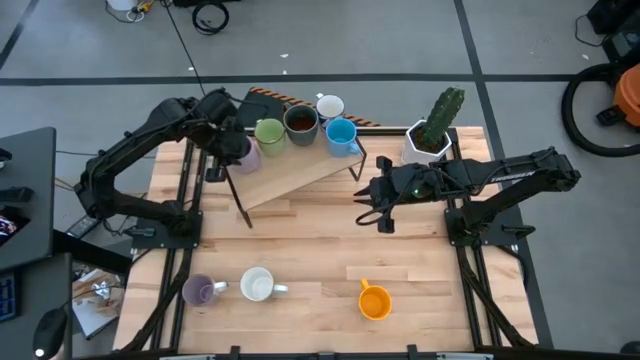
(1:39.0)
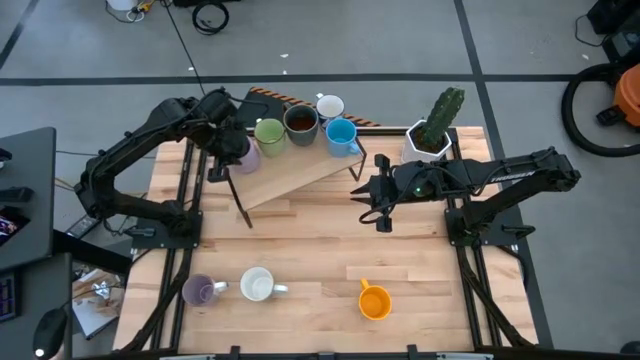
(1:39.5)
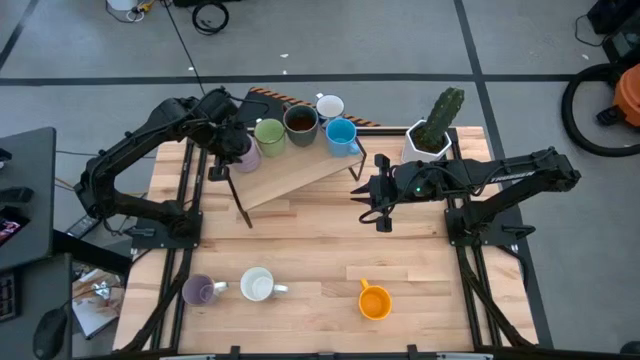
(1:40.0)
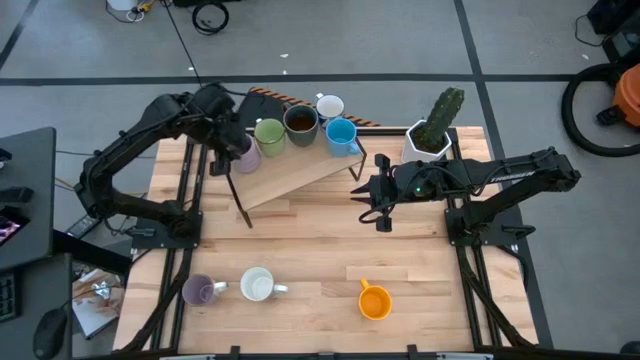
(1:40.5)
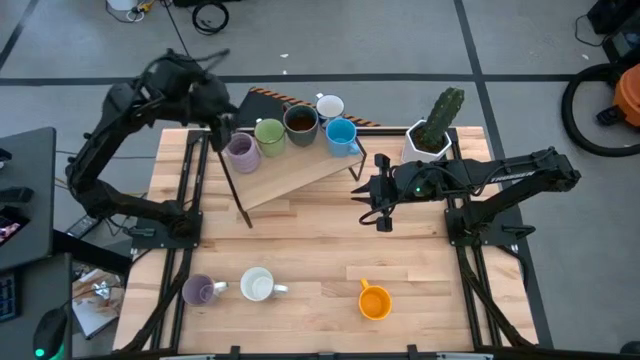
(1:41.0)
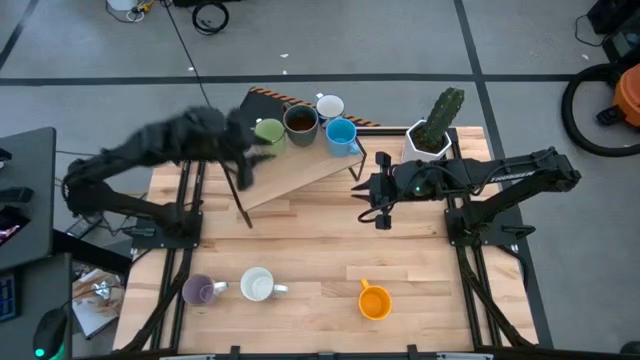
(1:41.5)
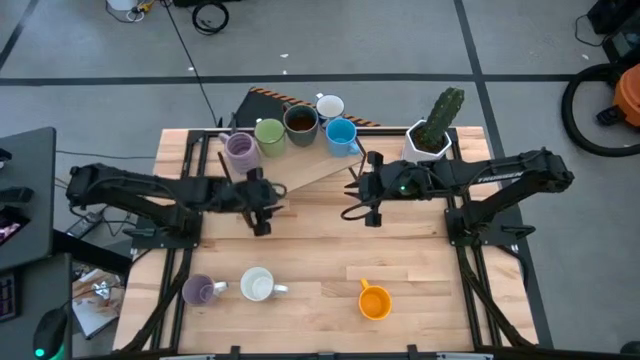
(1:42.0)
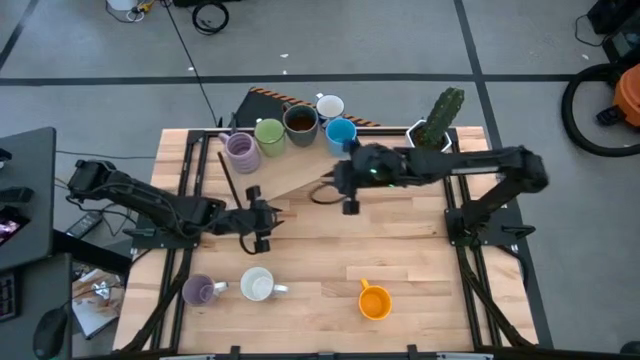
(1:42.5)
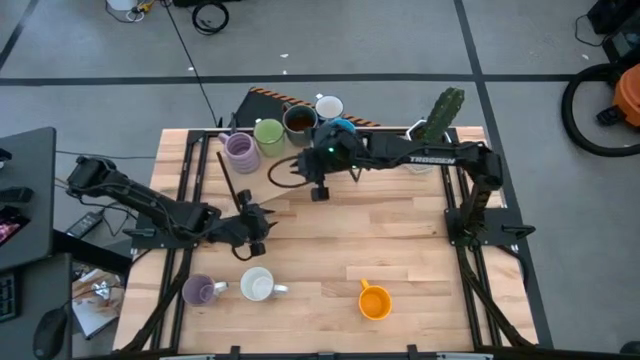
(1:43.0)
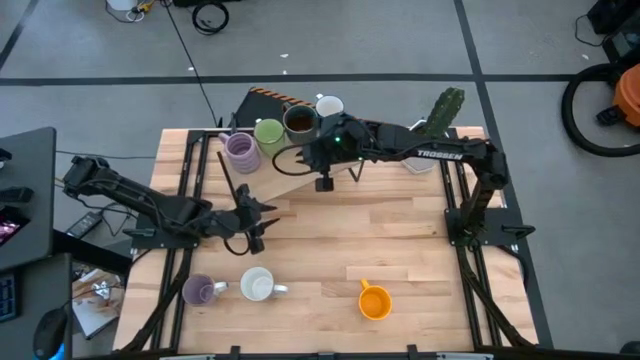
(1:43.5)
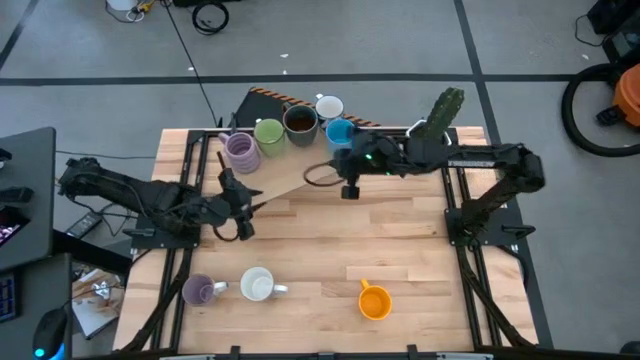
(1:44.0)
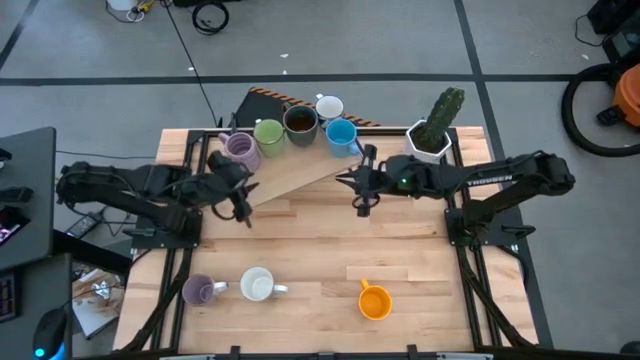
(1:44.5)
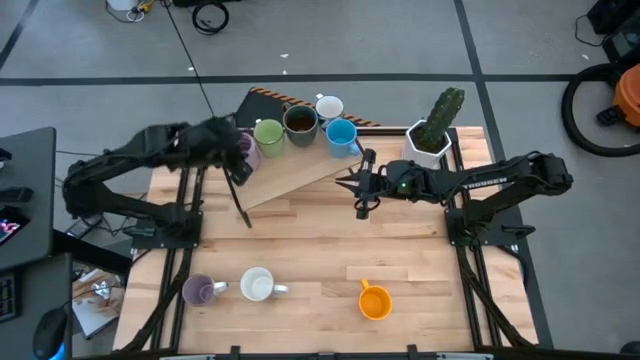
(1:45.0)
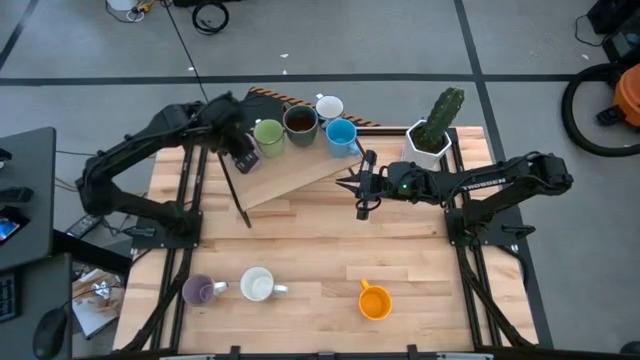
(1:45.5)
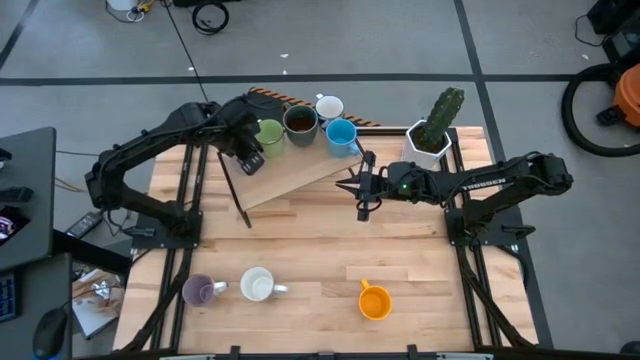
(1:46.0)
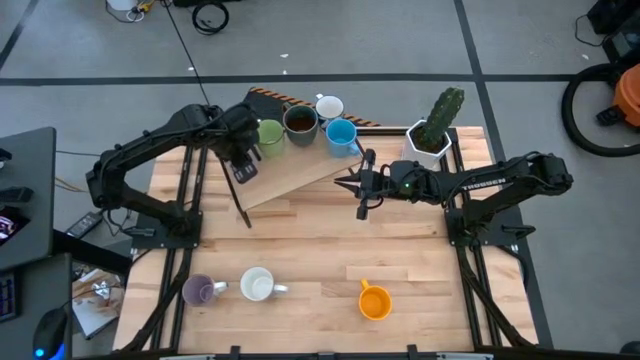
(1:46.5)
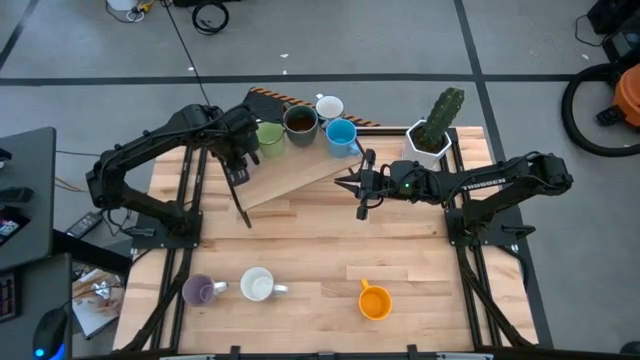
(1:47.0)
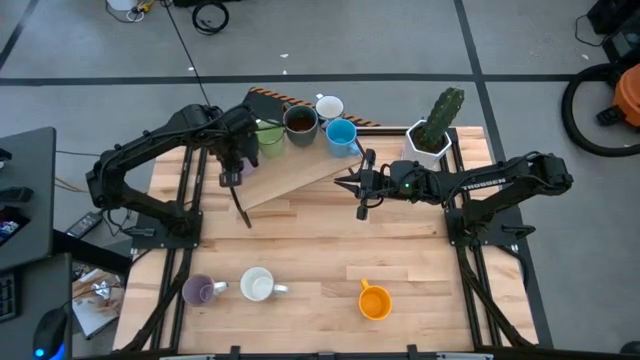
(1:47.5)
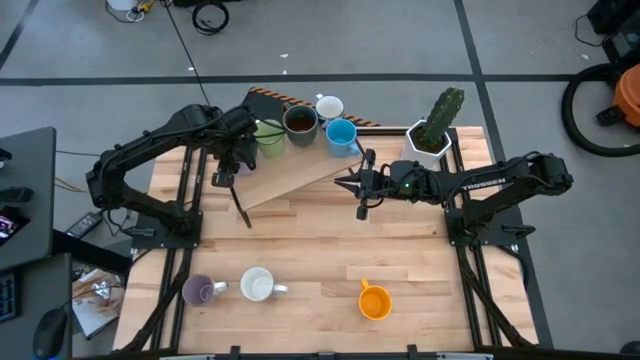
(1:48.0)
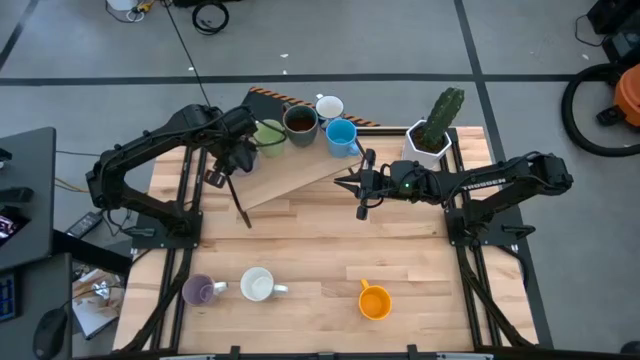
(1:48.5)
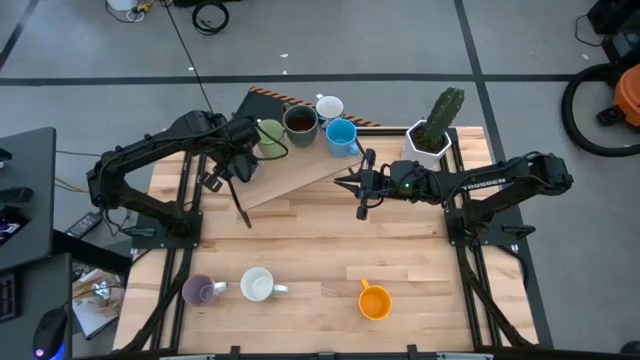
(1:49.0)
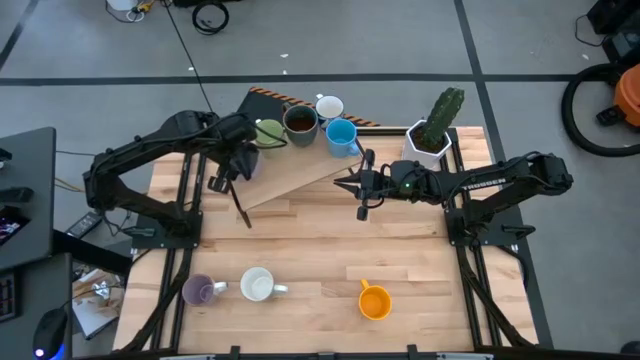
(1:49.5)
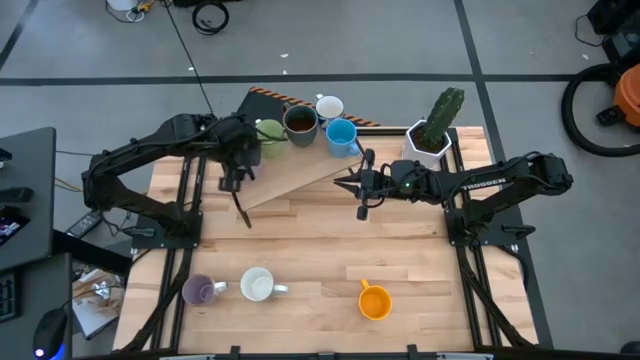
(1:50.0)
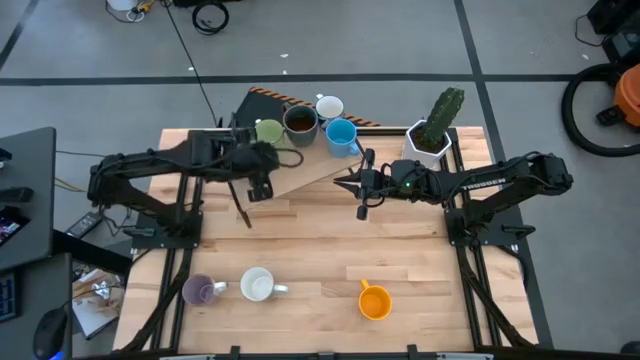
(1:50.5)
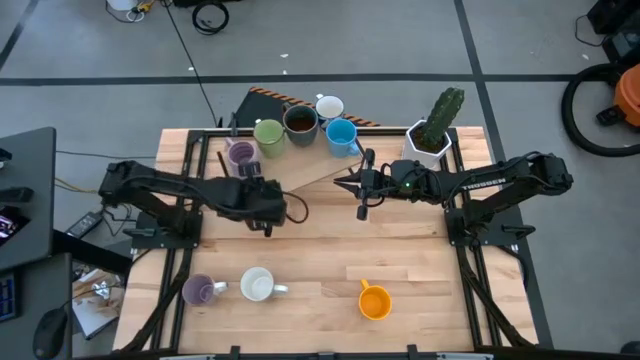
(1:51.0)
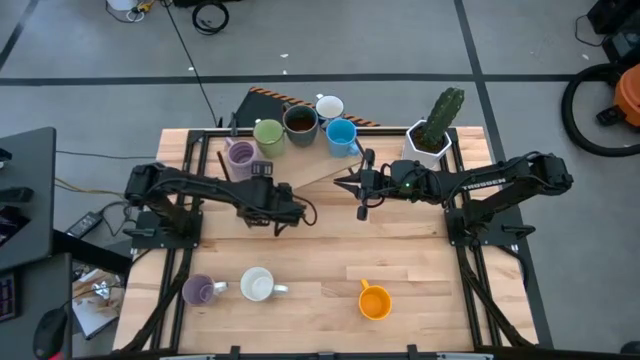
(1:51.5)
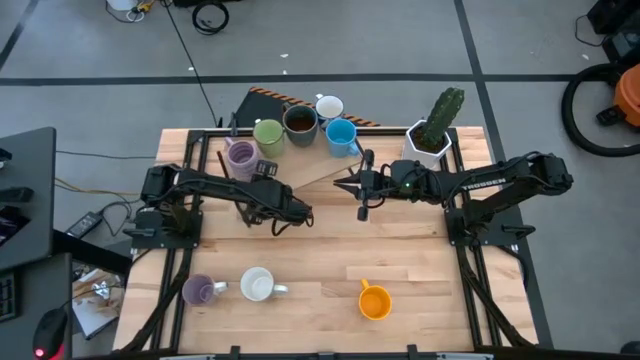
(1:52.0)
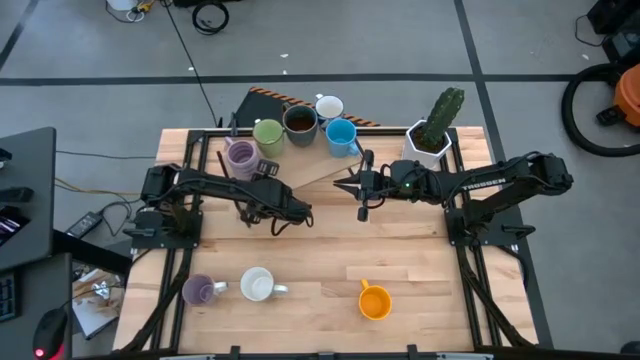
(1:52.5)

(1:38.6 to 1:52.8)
Task: Place coffee mugs
Put the purple mug on the shelf

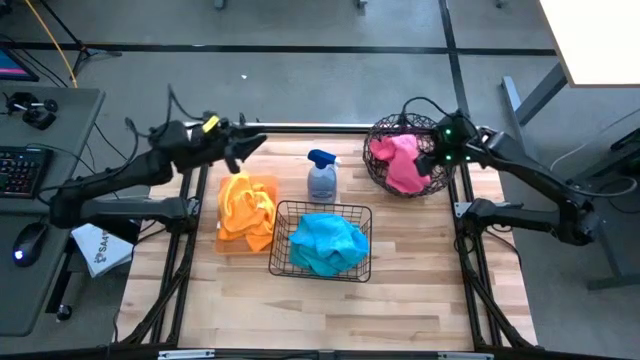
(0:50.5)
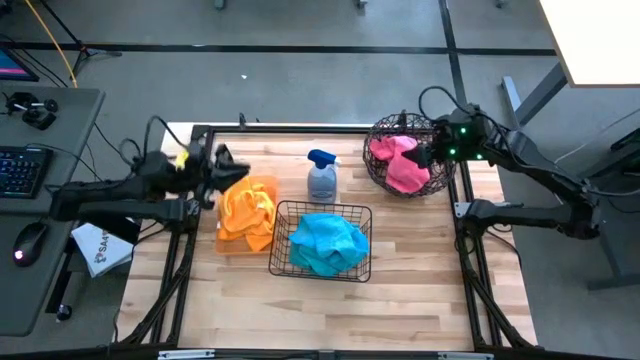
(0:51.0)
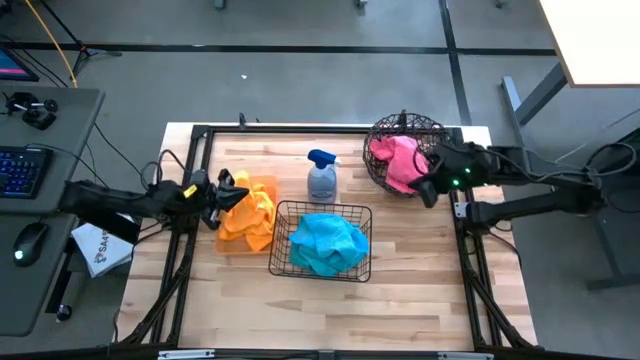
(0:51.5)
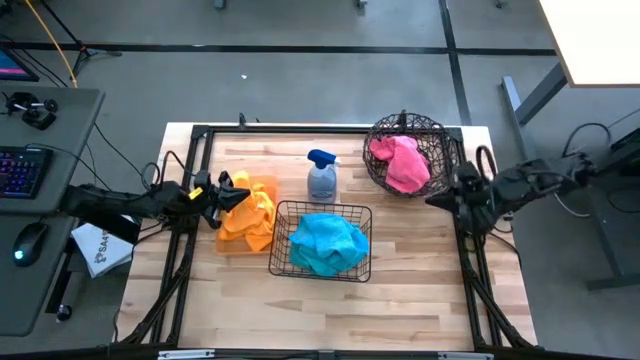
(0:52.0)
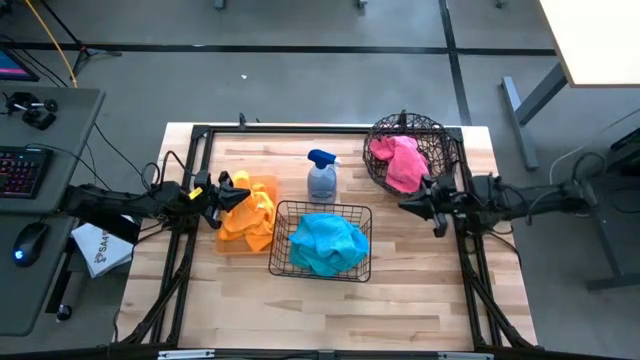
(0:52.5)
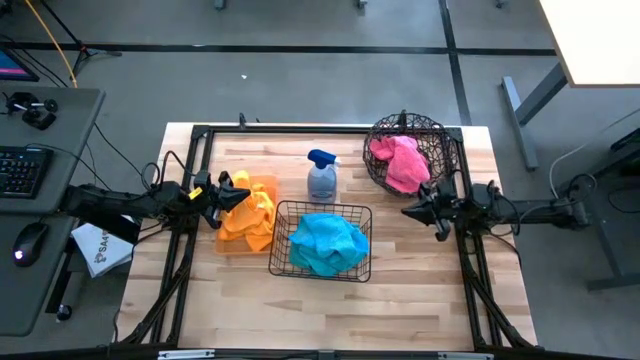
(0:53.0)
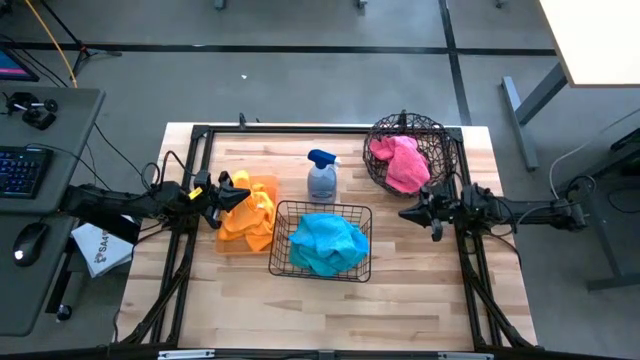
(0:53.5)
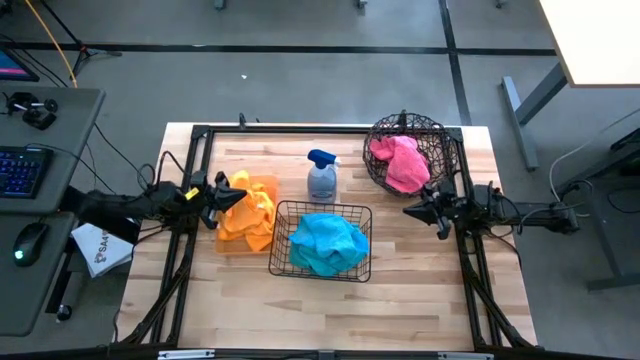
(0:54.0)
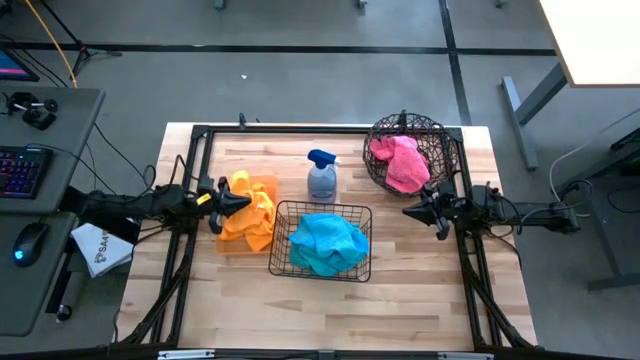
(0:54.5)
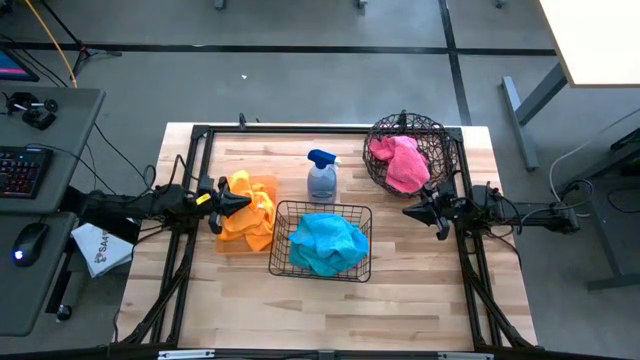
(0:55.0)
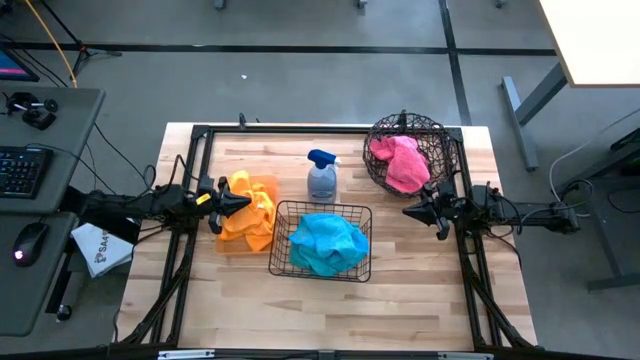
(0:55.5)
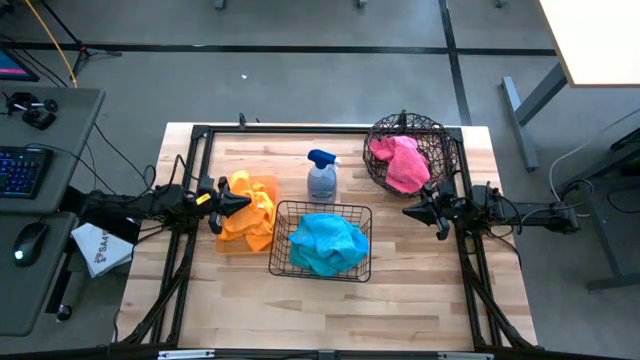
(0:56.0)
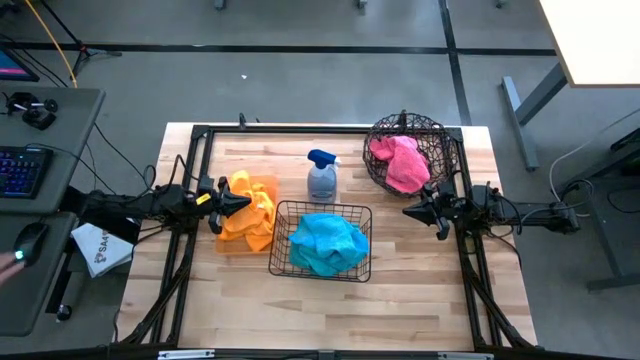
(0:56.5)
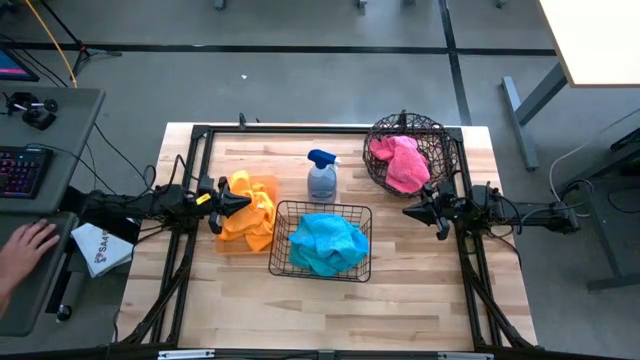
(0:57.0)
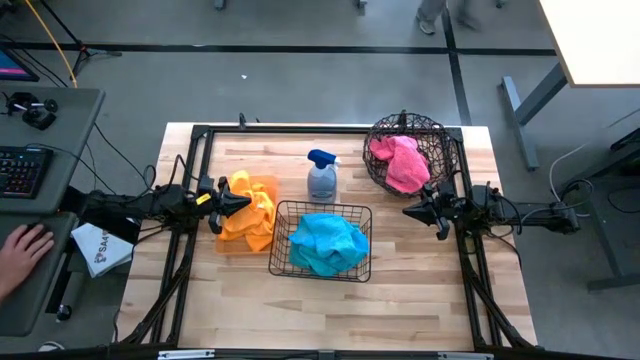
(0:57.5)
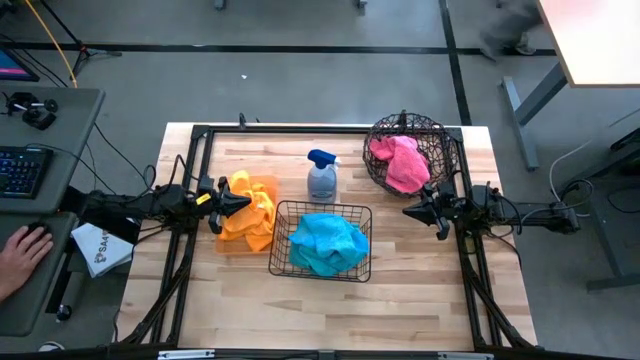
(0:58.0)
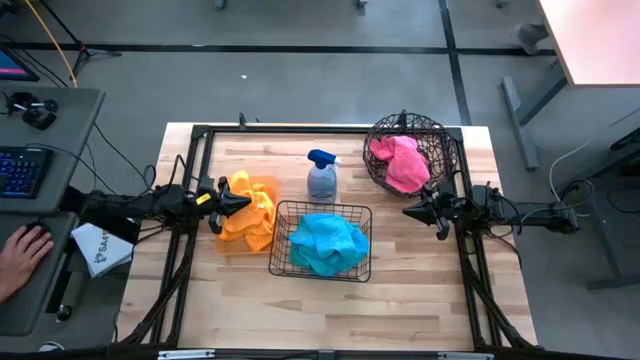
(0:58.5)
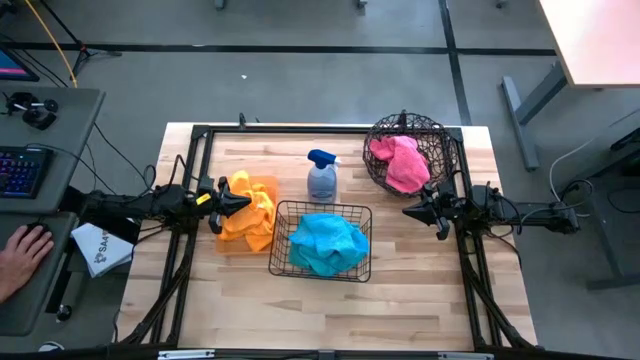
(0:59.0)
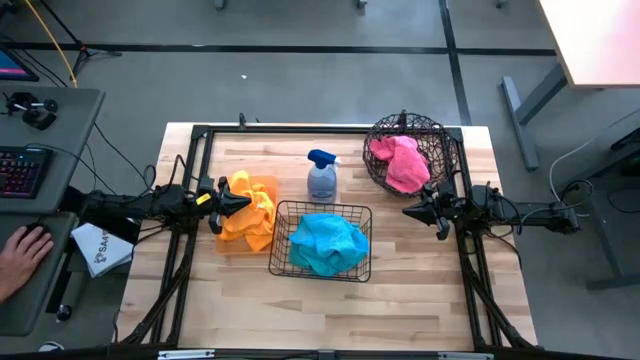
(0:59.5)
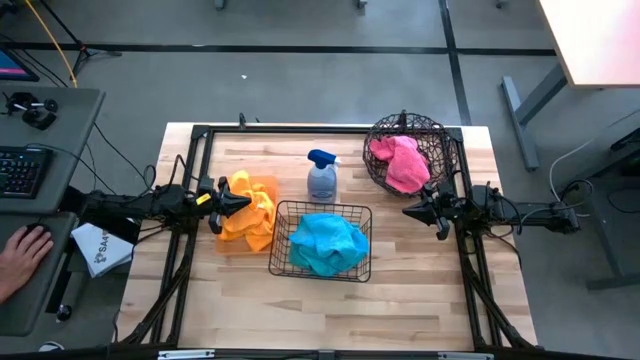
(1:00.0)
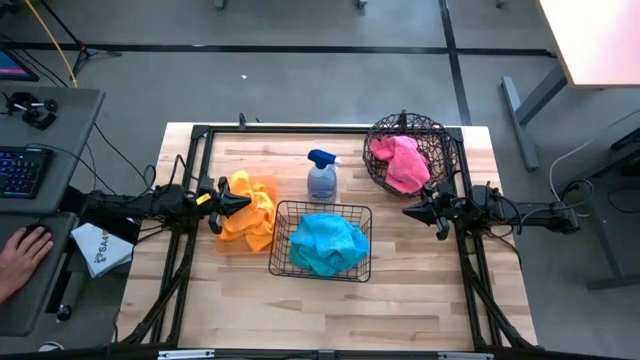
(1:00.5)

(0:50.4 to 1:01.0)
Task: Sort microfiber towel by color & place in baskets
Return to Home Position
